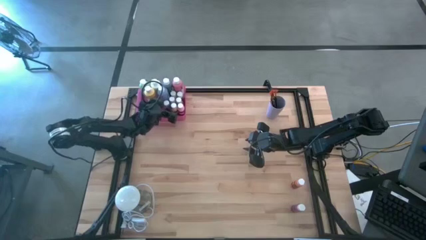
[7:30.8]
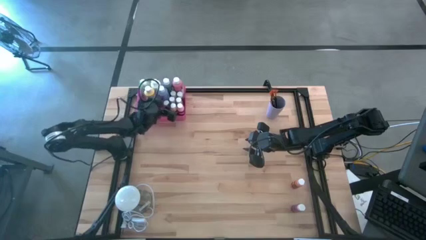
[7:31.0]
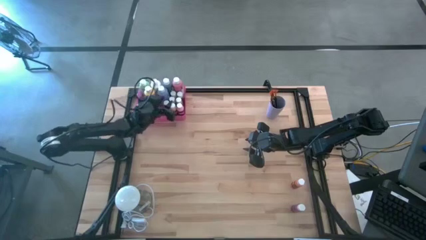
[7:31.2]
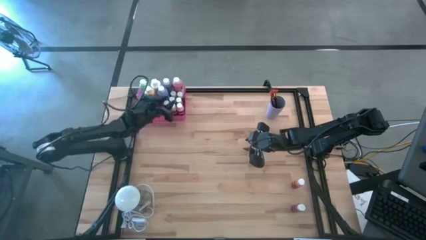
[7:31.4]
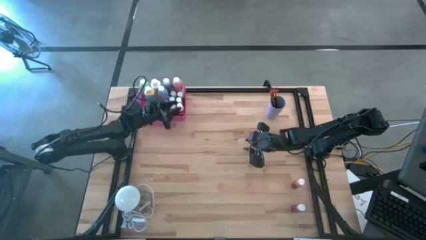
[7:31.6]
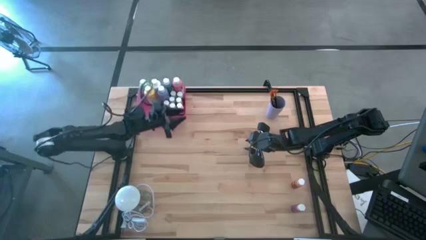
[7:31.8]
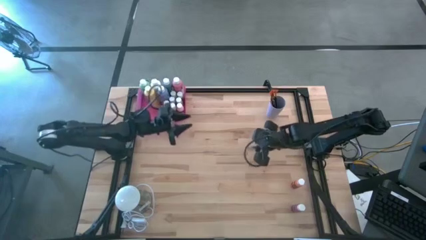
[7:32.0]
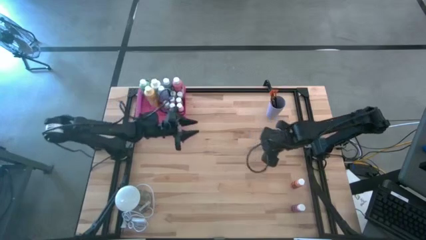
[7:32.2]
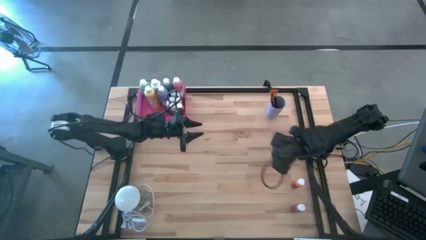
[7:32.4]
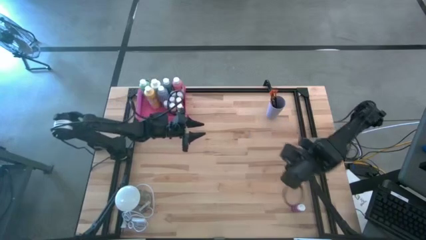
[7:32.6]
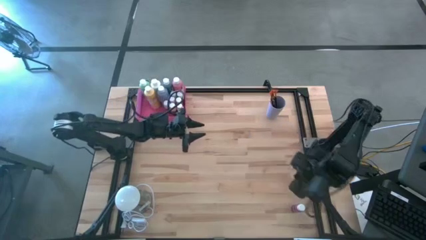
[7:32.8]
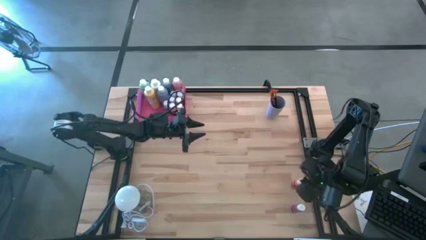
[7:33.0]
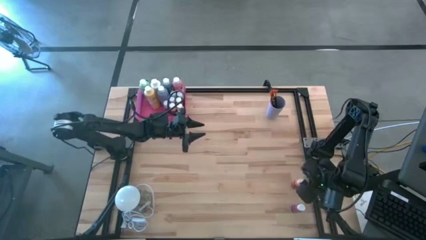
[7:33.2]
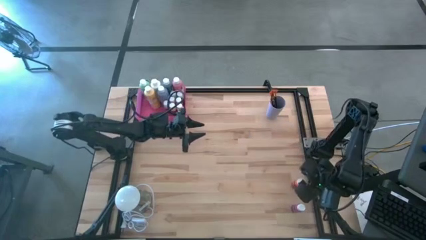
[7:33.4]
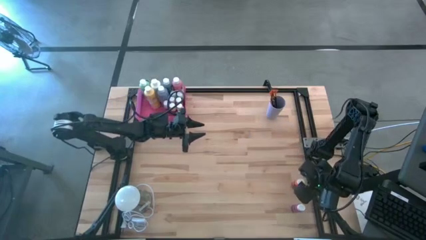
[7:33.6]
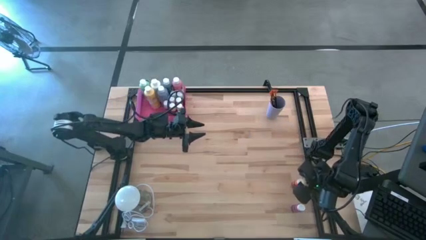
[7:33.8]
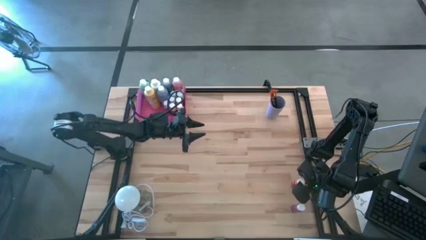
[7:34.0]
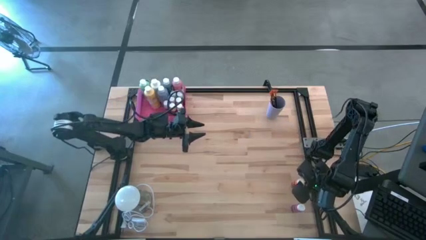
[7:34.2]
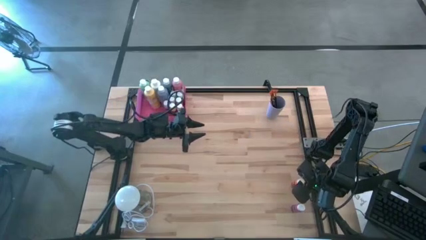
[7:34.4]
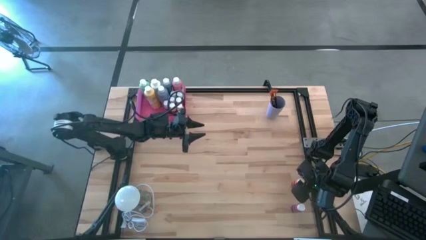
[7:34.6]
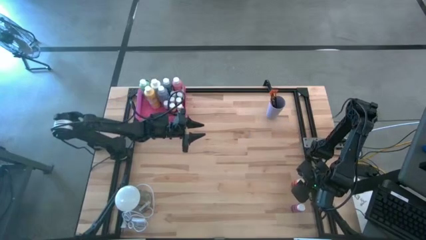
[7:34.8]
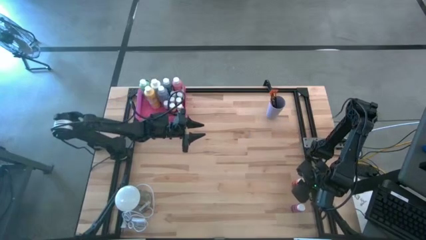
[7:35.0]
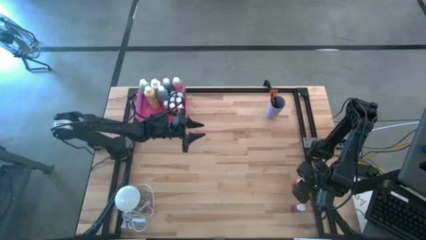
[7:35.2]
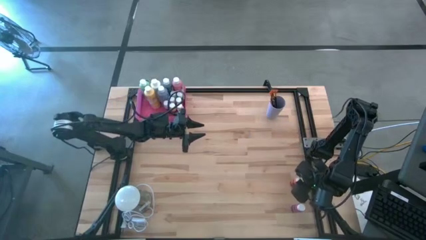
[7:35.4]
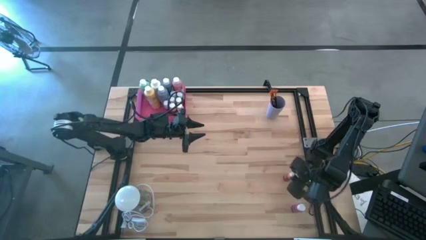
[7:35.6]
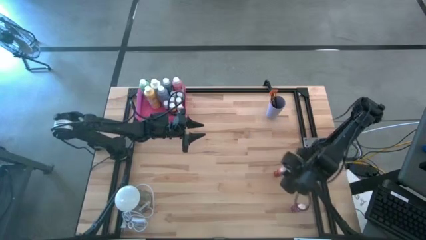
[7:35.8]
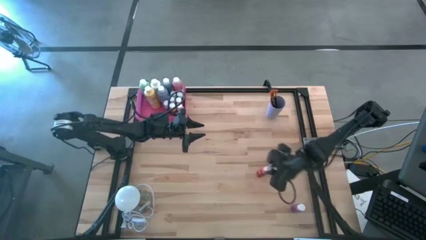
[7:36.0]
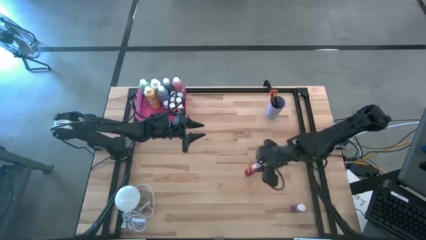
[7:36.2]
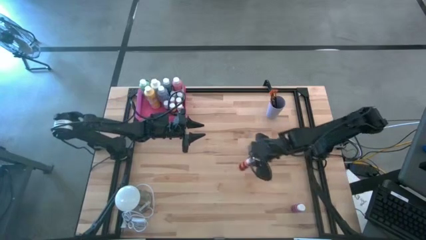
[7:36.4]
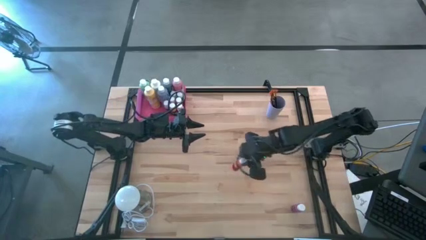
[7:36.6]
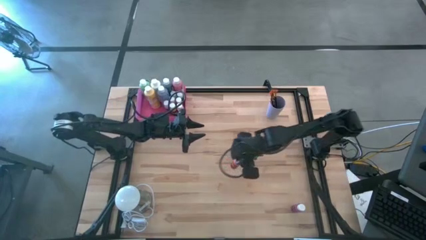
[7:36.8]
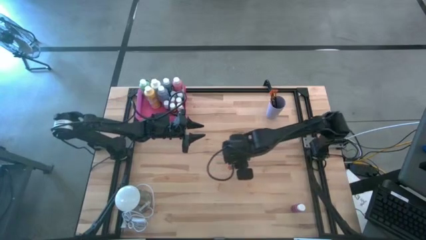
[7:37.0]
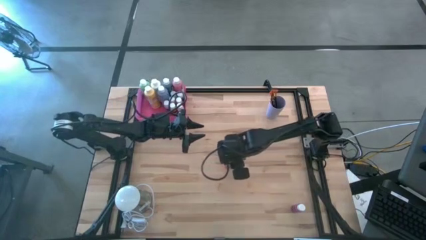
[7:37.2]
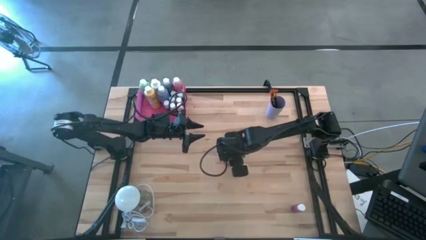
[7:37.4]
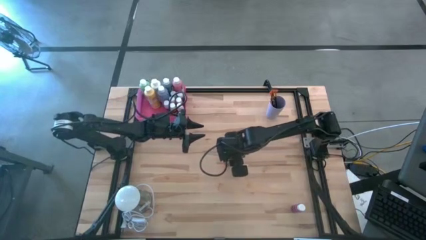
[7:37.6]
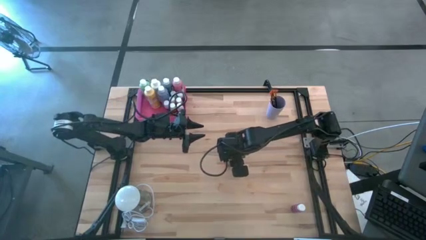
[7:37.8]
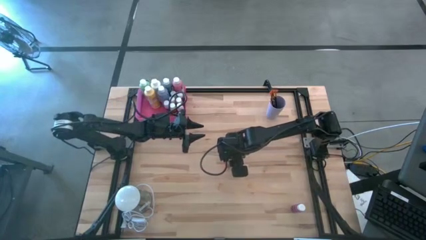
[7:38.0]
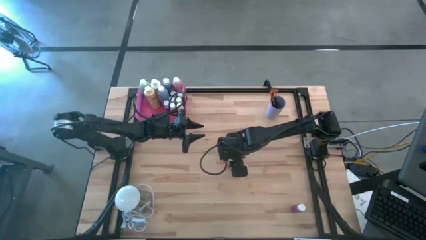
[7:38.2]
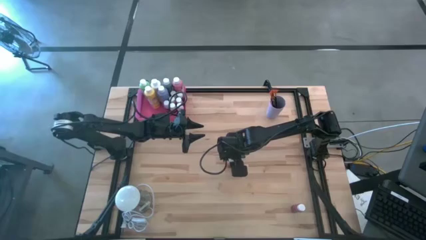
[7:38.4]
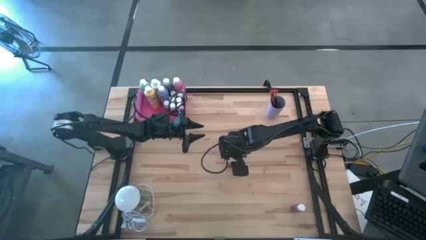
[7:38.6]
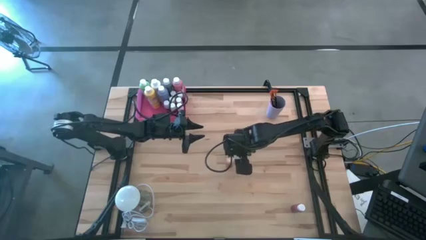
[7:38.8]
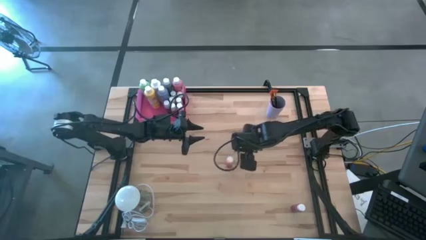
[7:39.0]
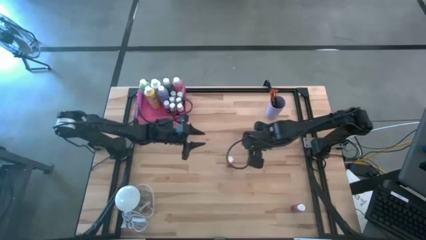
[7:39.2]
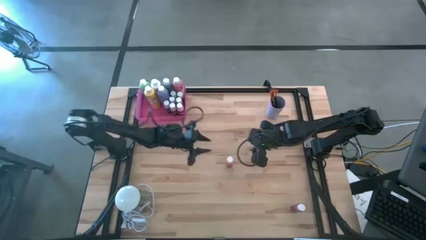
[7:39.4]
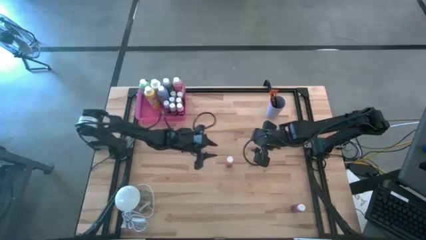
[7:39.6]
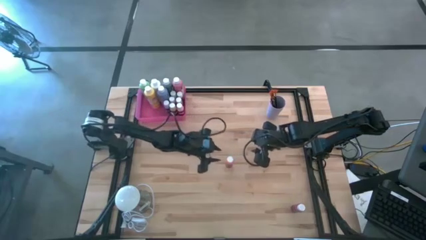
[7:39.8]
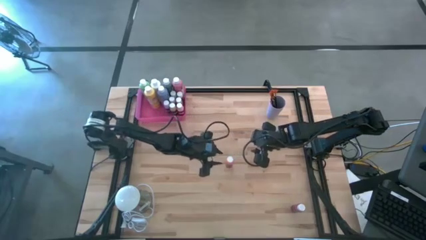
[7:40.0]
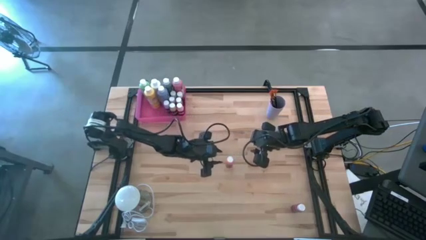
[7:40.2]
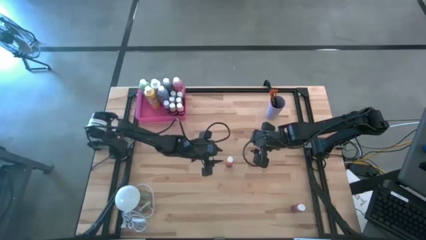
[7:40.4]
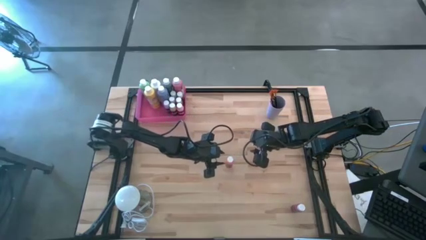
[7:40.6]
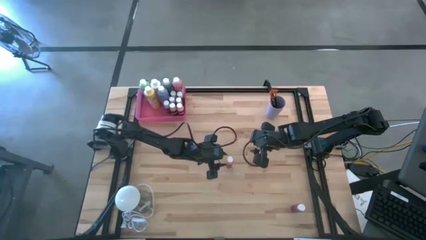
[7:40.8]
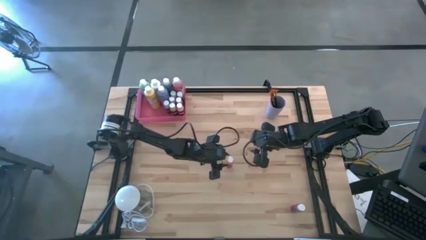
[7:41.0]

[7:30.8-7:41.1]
Task: Pick & Place Paint Supplies
Put the small orange paint bottle into the pink bin
